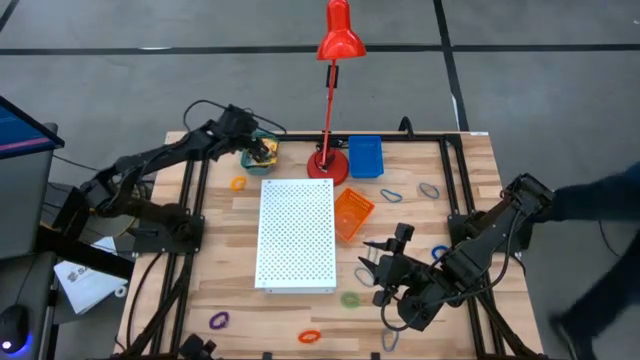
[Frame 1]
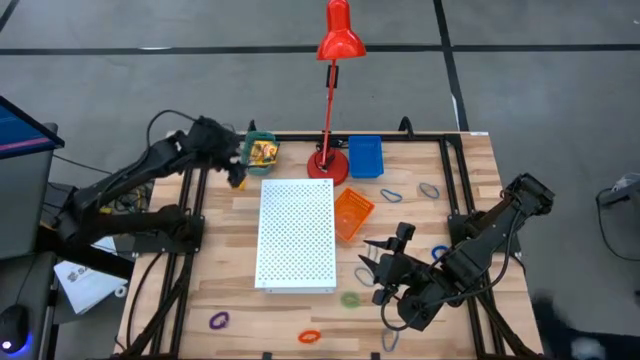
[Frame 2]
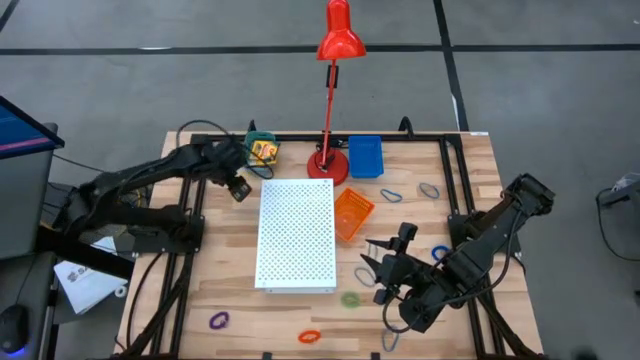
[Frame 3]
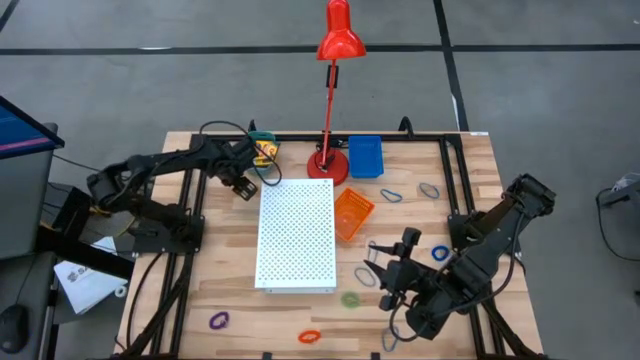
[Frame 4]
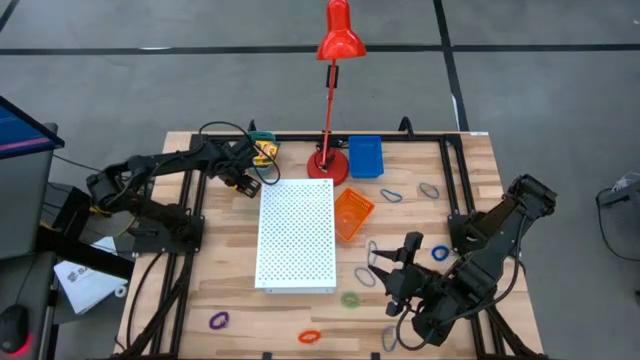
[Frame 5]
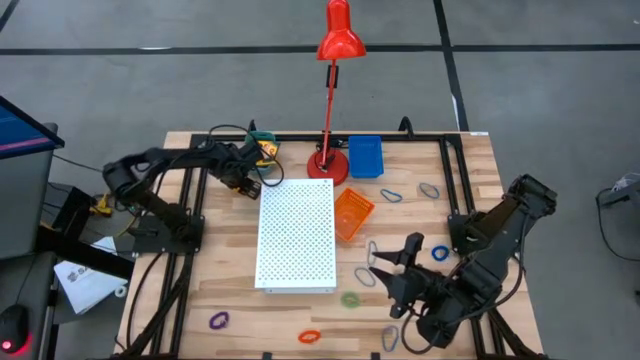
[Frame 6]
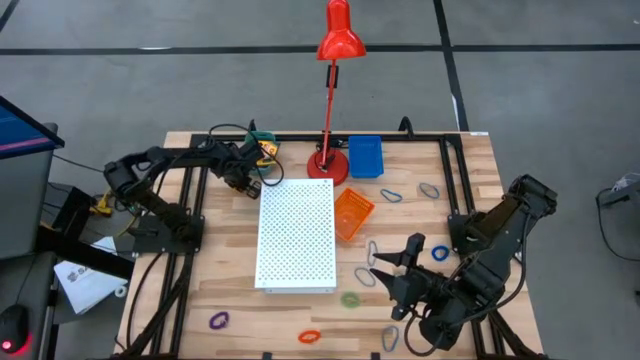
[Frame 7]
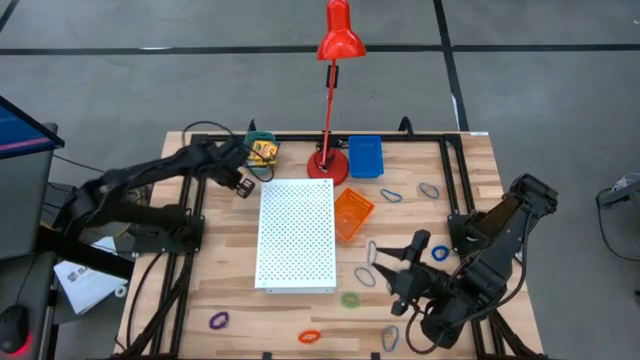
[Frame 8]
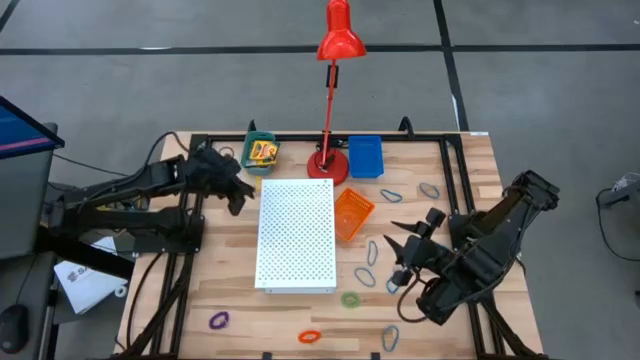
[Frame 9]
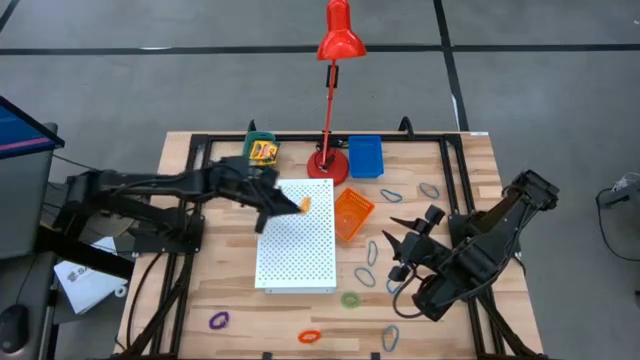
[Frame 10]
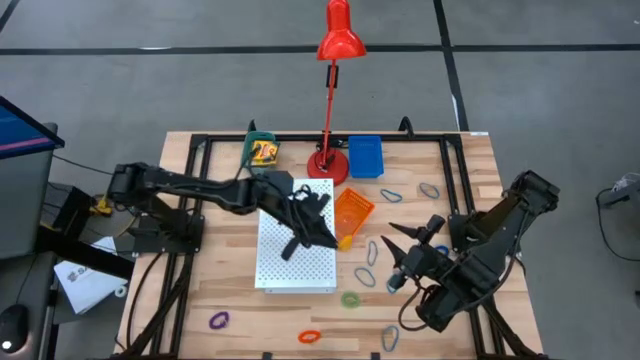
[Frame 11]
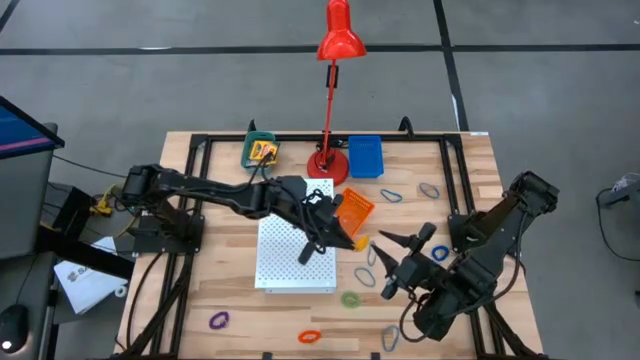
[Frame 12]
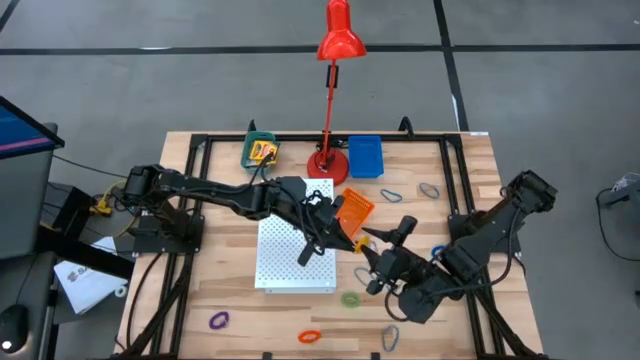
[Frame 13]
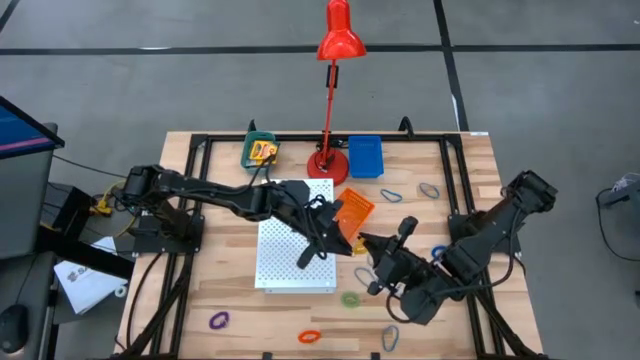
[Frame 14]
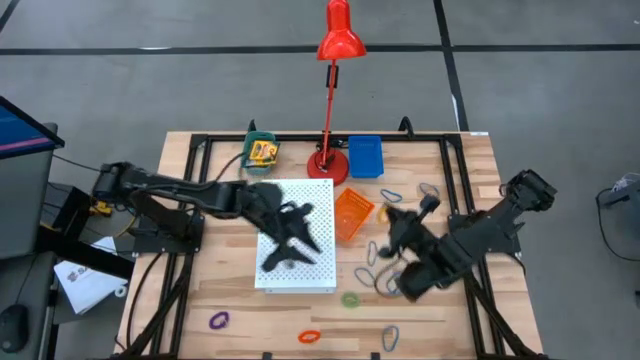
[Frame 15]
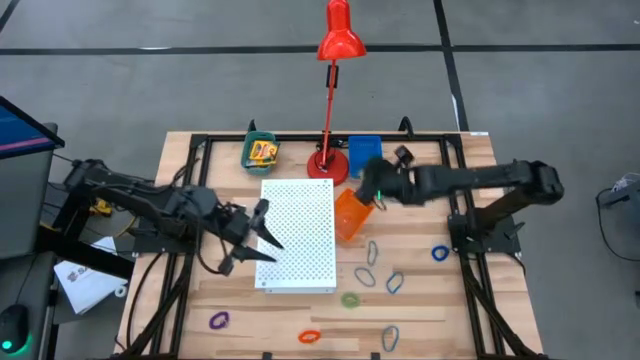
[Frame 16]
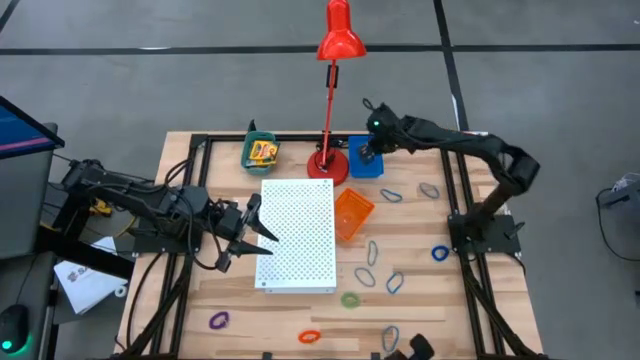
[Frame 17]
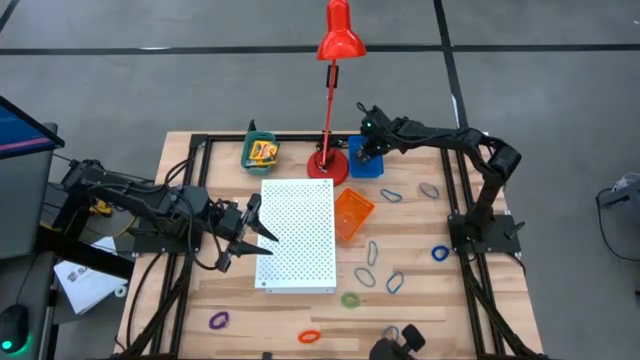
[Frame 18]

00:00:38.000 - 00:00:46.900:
Task: Pick & Place Office Desk Supplies
Put the yellow spring keychain into the blue bin

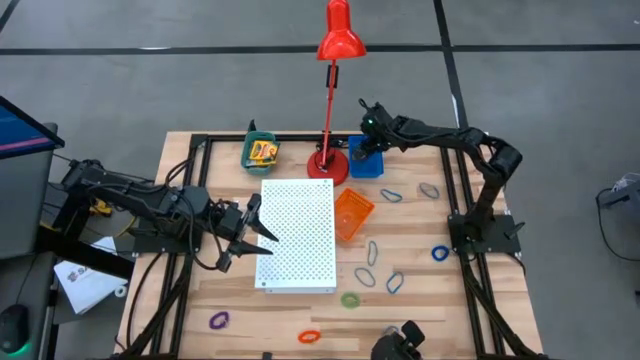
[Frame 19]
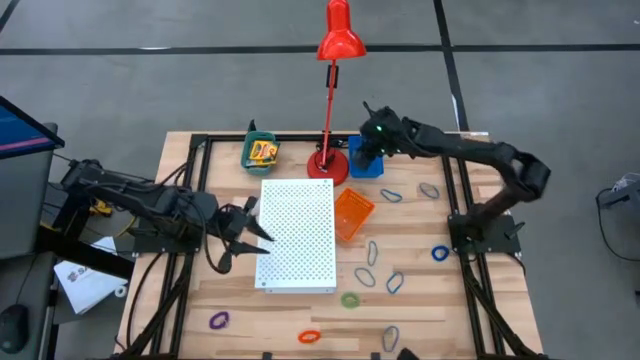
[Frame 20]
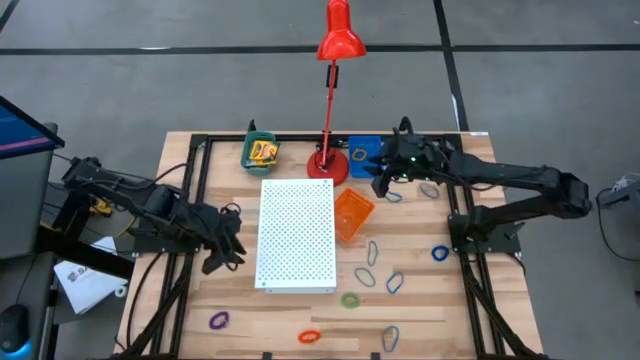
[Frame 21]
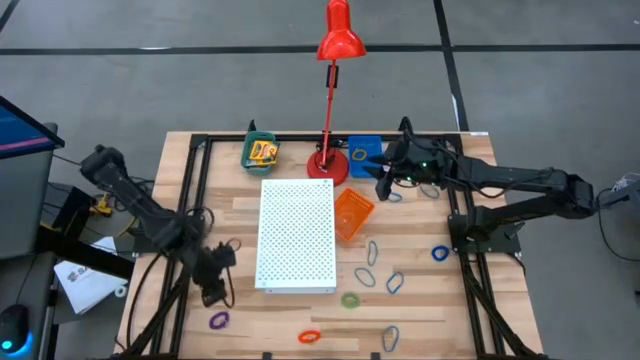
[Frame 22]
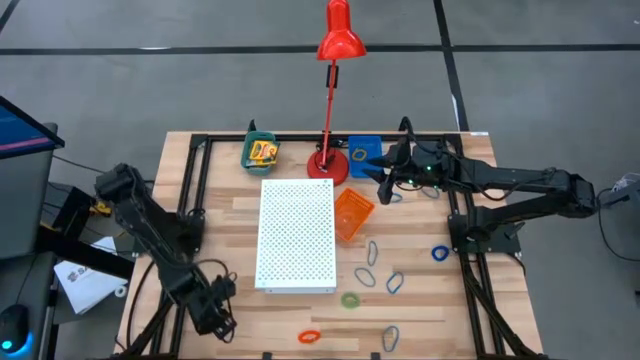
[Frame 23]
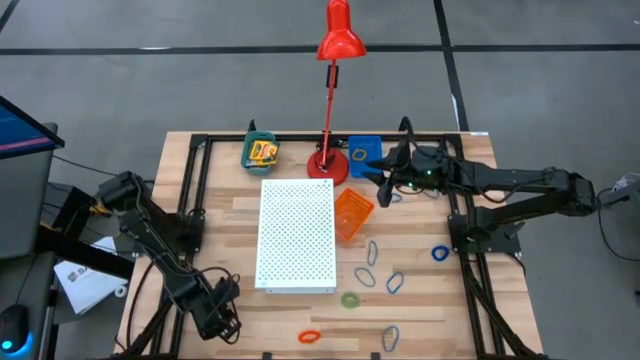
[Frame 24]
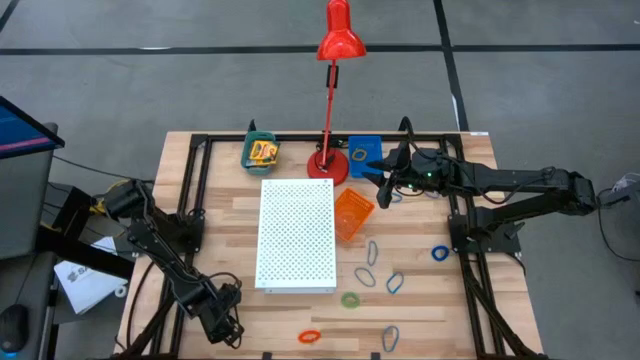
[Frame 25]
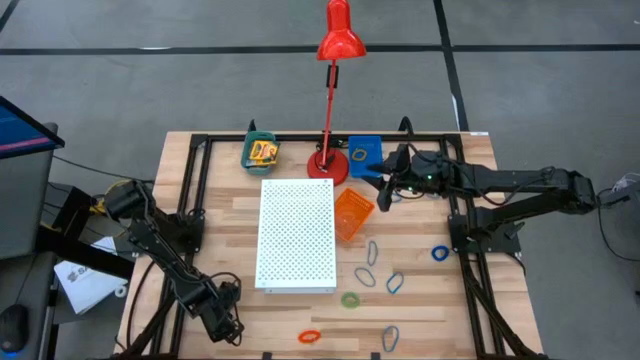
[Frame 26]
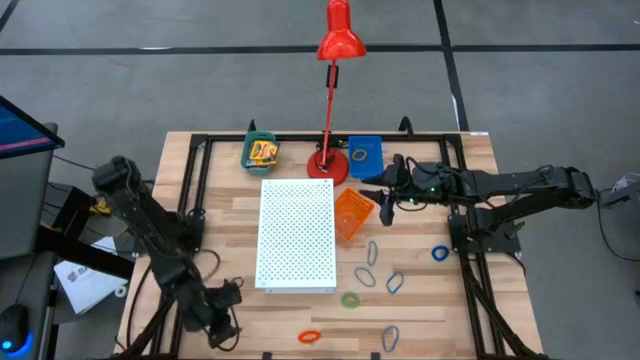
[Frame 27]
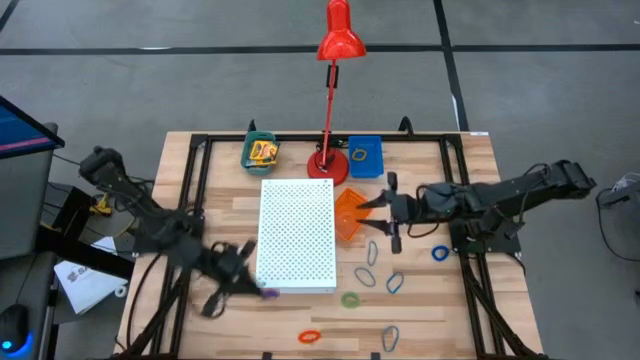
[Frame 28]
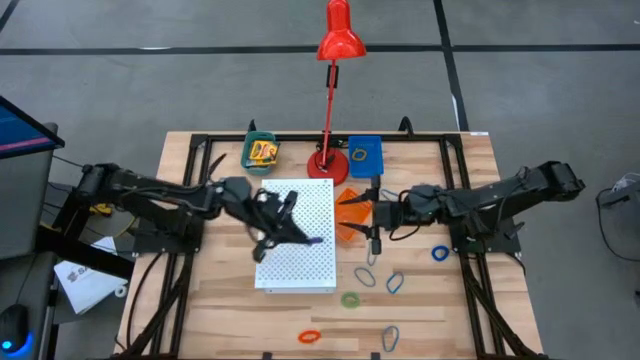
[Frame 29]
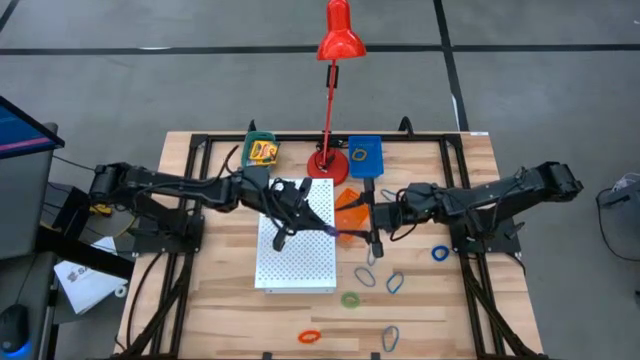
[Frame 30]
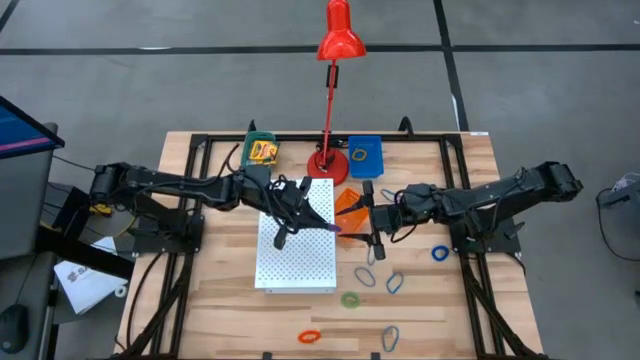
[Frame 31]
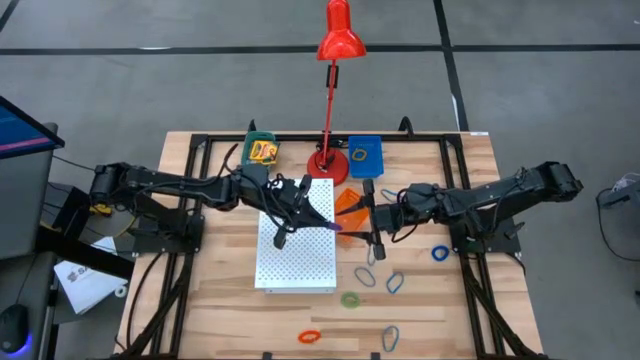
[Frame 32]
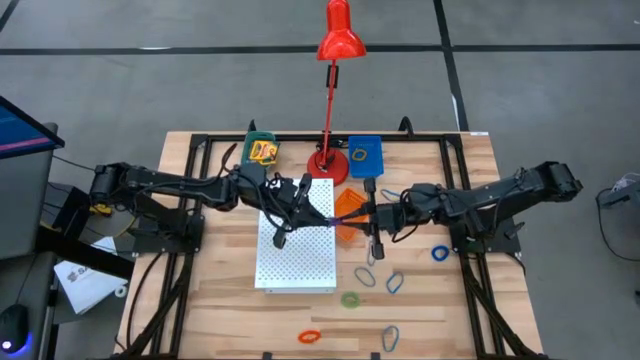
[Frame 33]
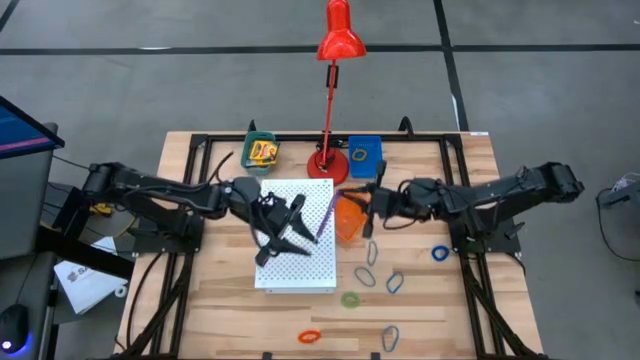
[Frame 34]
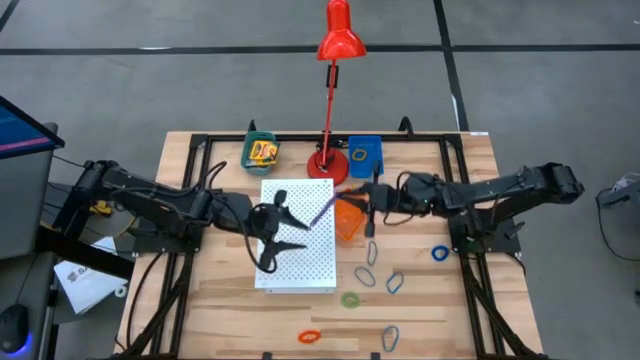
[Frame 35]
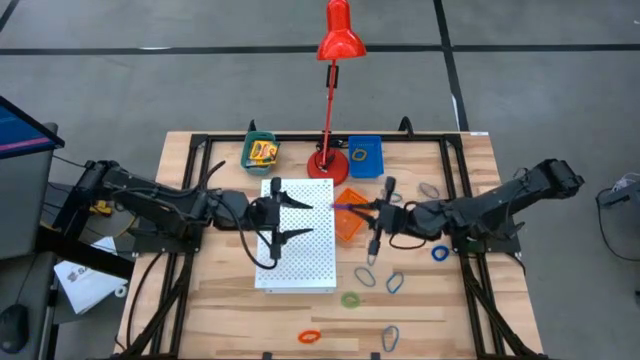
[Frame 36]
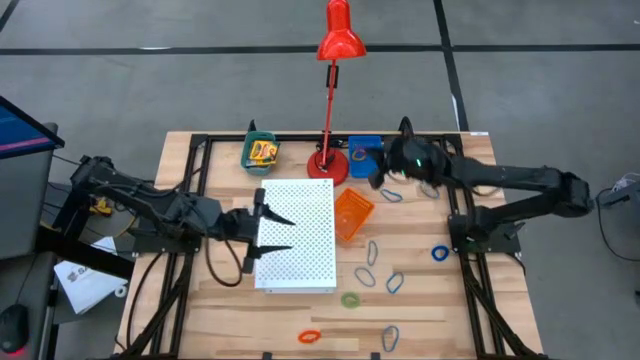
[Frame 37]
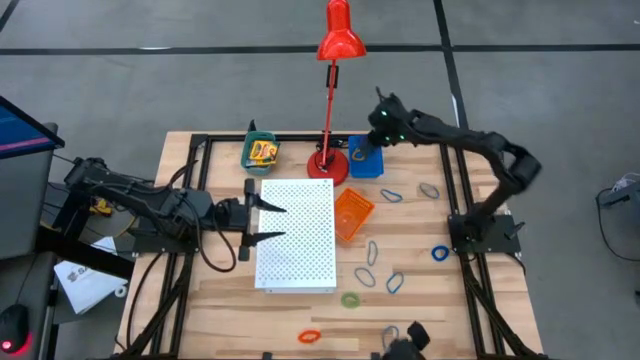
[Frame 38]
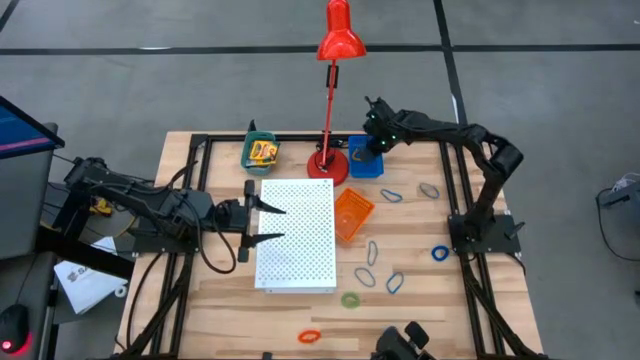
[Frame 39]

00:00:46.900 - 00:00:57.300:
Put the purple spring keychain into the blue bin

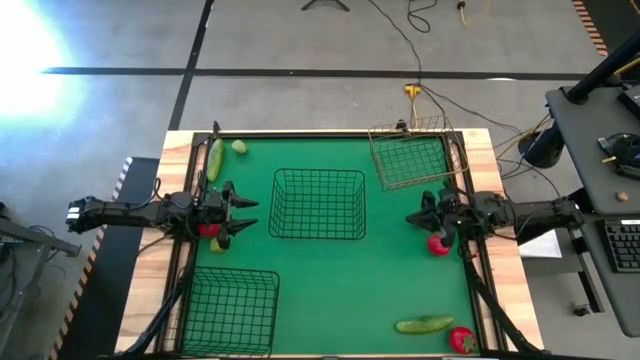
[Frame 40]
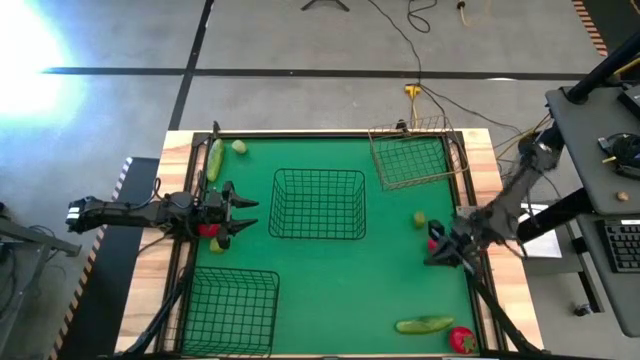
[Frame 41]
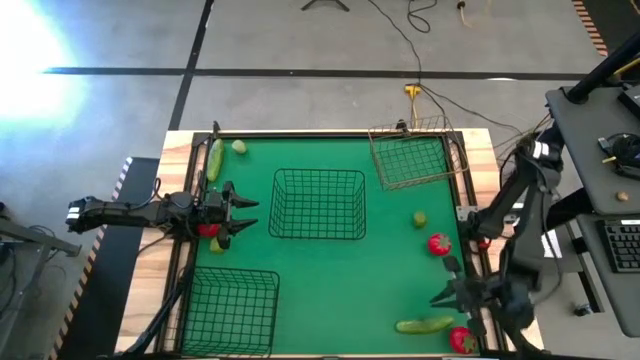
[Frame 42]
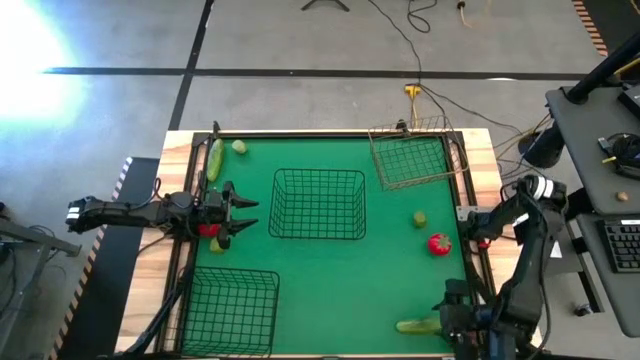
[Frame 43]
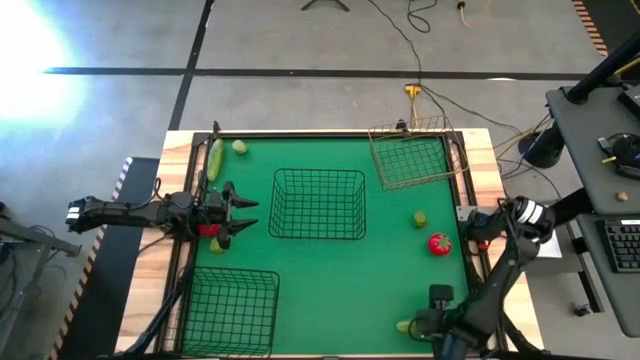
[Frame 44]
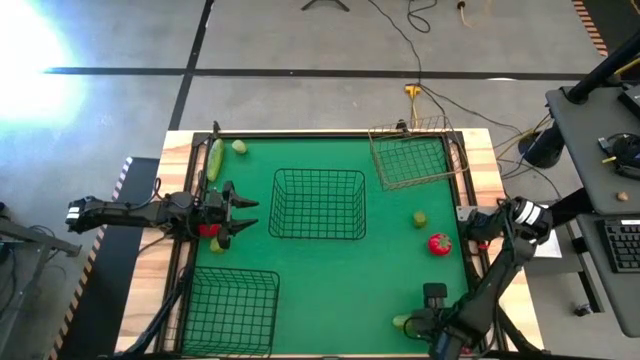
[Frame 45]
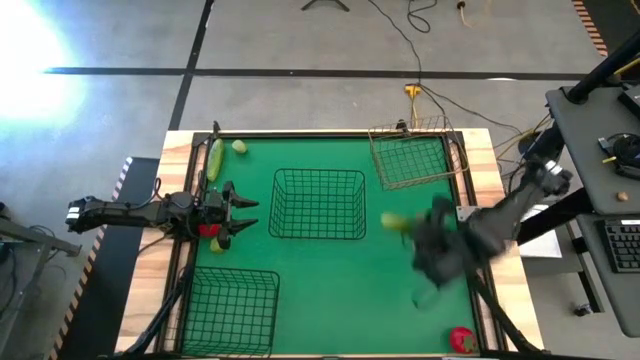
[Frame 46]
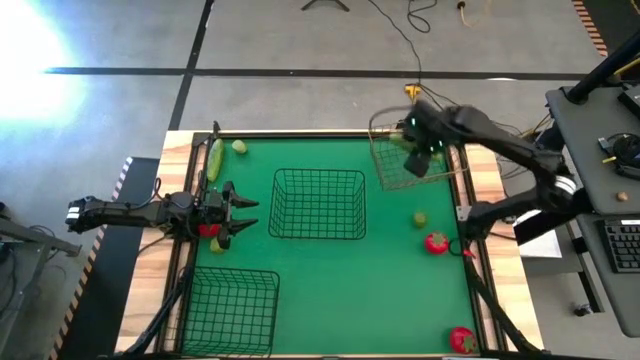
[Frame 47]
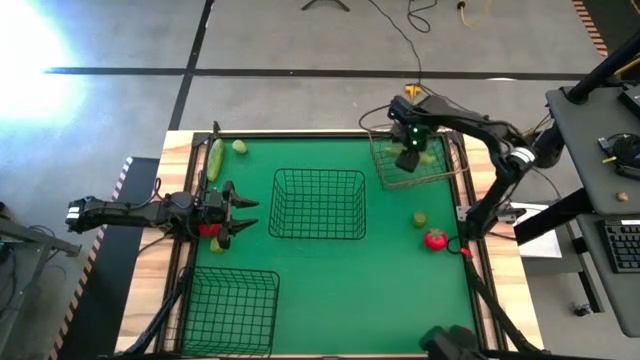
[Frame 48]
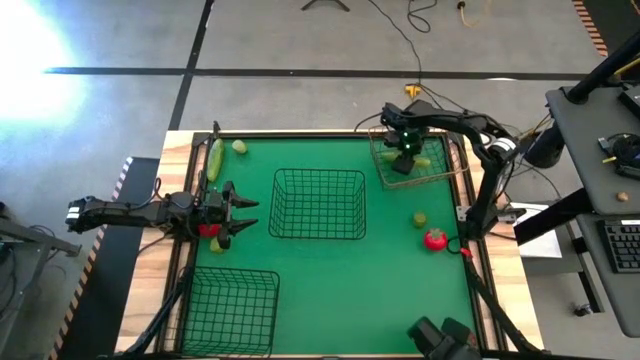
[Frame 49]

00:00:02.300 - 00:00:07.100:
Task: Sort produce into baskets
Put the bottom green cucumber into the gold wire basket
